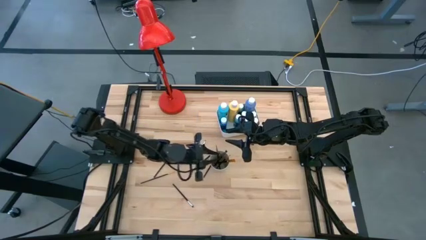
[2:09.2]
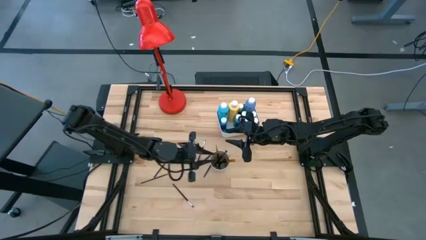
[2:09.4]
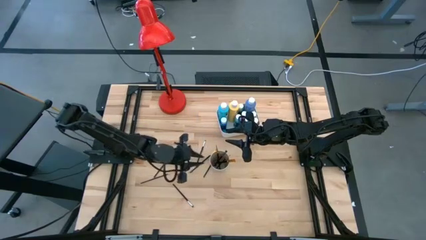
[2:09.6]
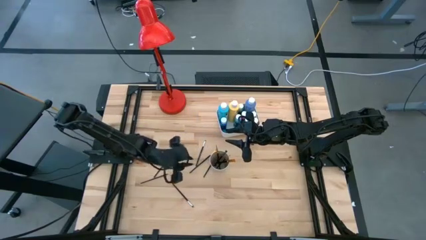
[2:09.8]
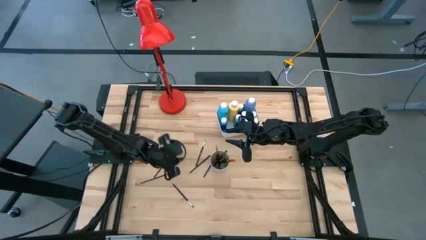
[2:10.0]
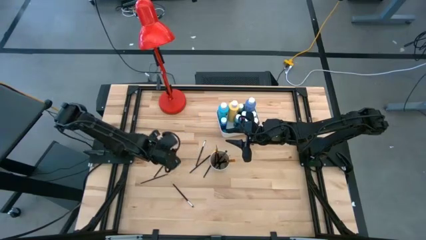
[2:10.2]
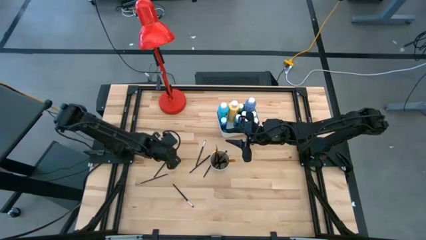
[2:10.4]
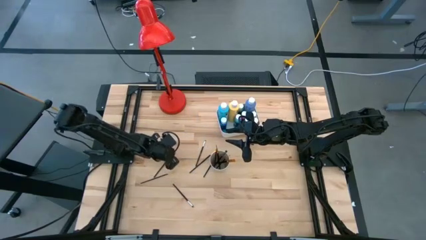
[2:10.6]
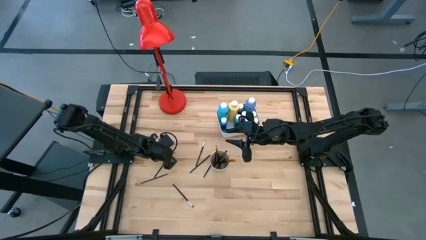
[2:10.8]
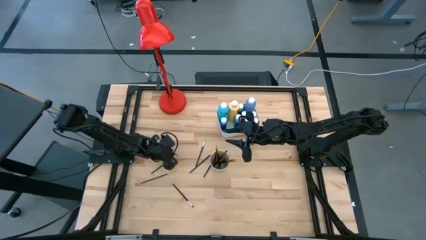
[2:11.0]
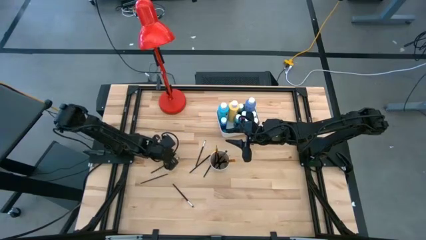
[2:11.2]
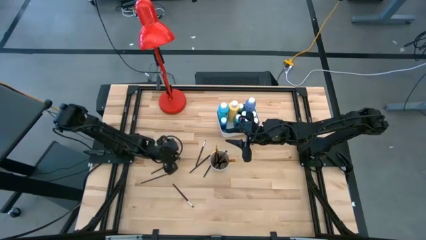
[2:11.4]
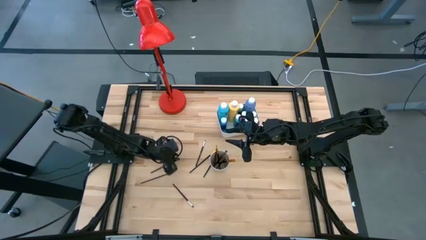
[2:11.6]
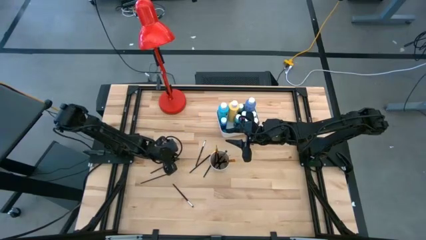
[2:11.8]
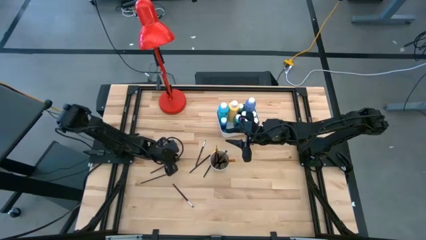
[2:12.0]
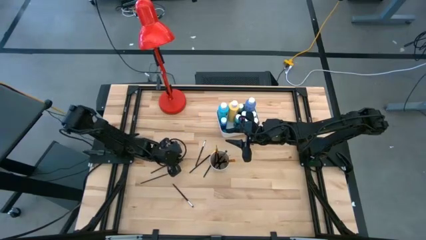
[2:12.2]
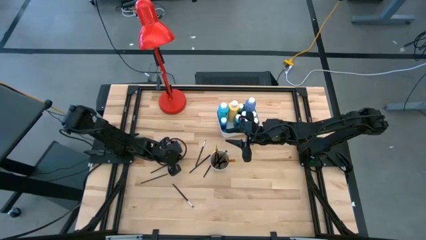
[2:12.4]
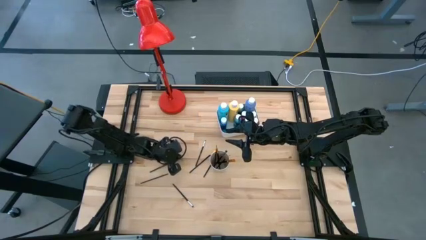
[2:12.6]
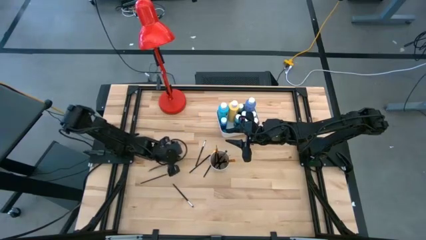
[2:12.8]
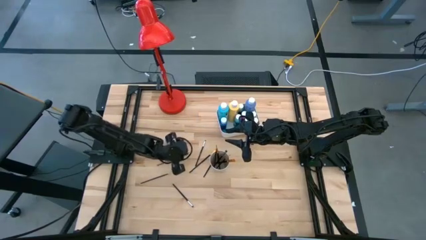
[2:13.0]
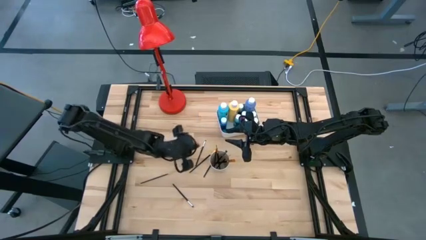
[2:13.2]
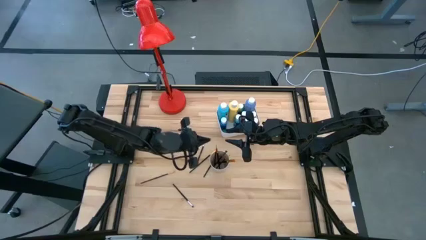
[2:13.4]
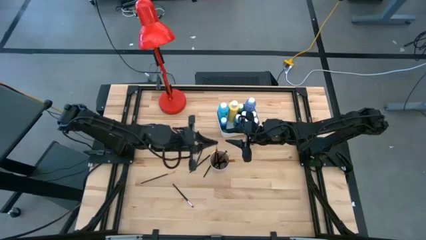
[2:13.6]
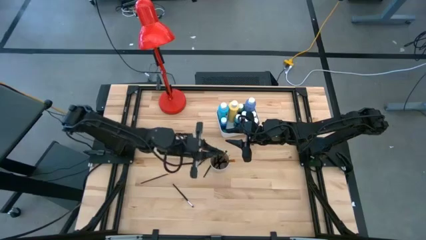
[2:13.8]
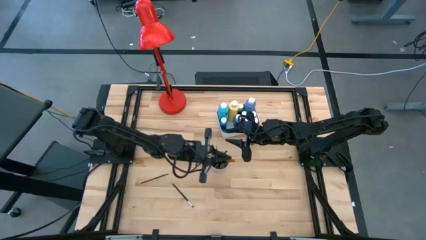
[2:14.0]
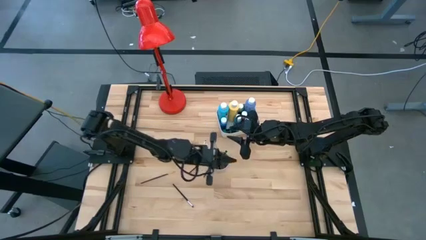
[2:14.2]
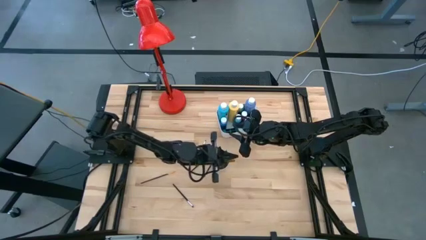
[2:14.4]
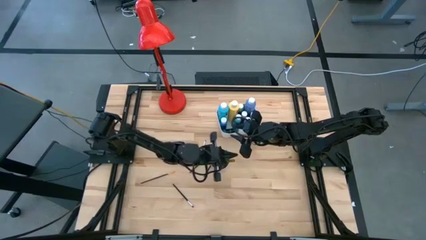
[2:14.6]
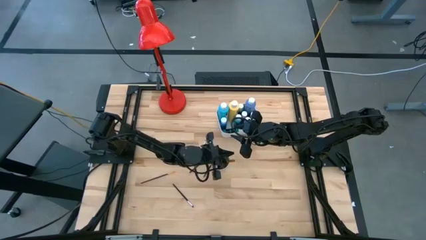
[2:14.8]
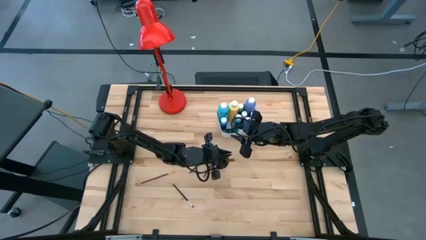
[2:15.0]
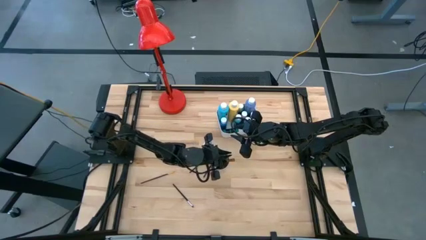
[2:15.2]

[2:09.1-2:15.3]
Task: Pick & Place Paint Supplies
Put the silver paint brush into the white cup

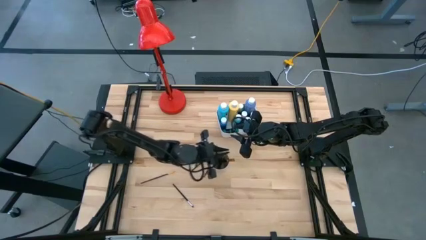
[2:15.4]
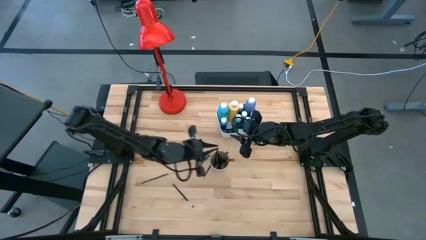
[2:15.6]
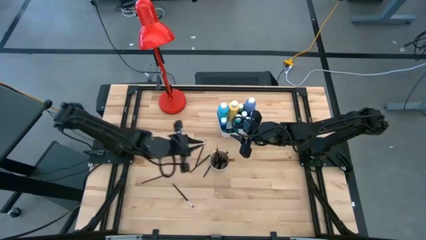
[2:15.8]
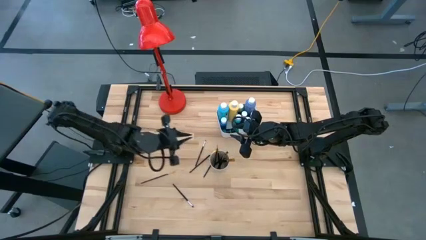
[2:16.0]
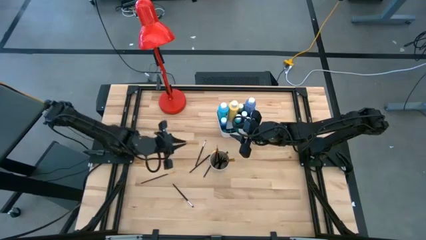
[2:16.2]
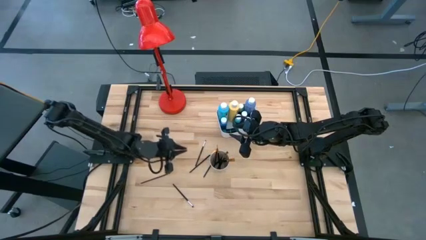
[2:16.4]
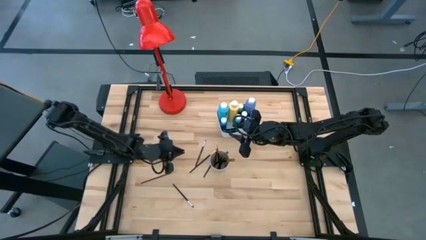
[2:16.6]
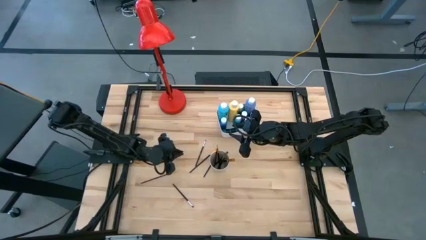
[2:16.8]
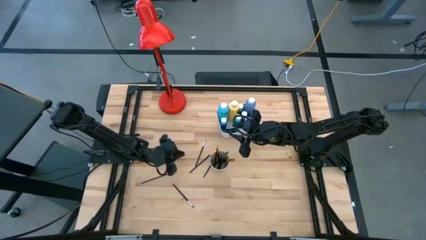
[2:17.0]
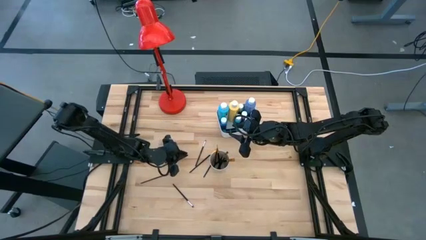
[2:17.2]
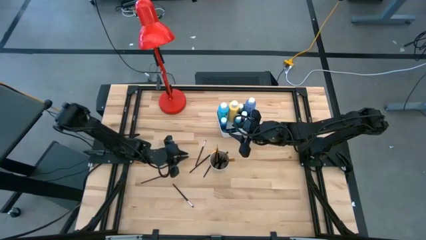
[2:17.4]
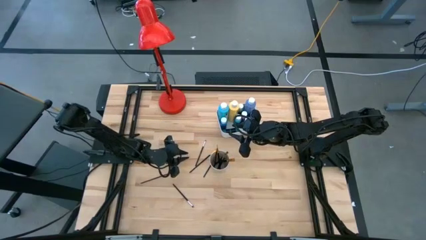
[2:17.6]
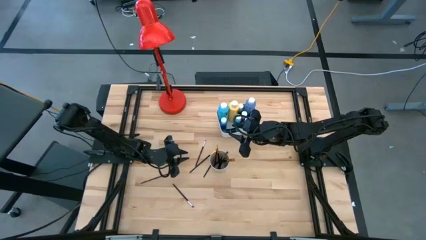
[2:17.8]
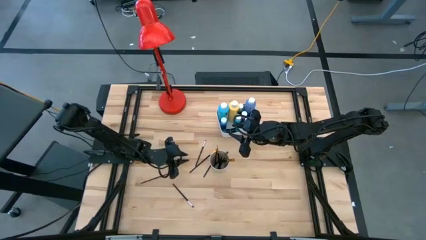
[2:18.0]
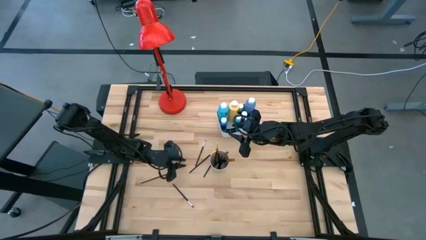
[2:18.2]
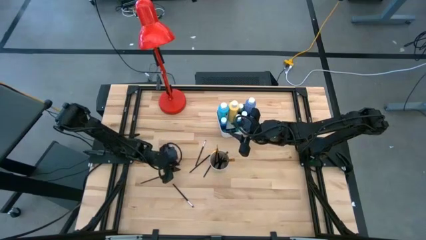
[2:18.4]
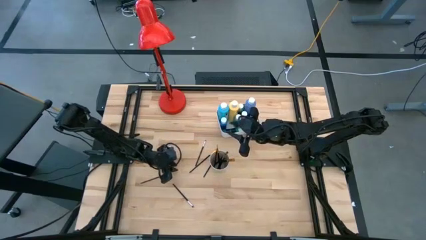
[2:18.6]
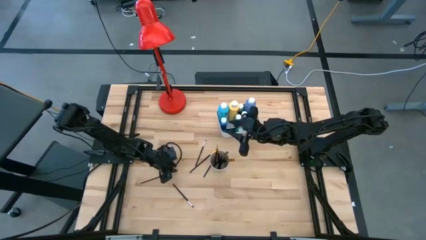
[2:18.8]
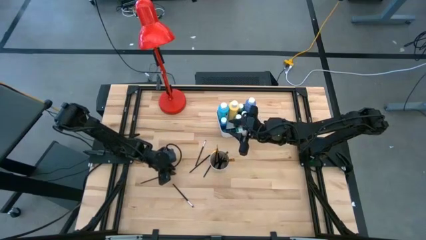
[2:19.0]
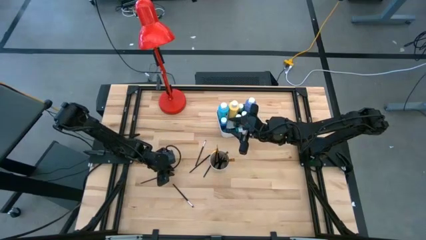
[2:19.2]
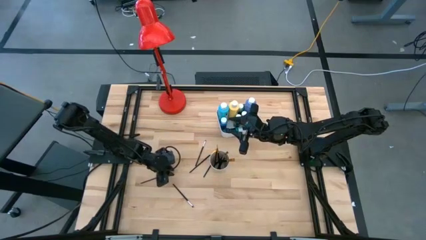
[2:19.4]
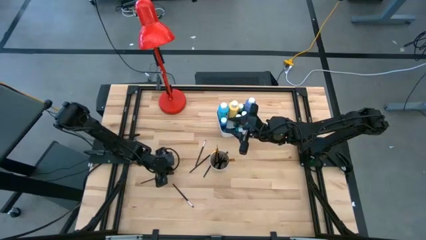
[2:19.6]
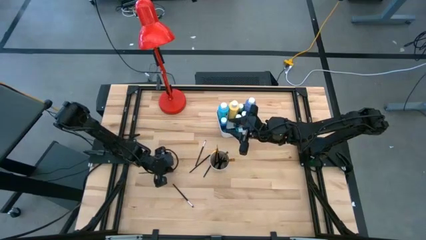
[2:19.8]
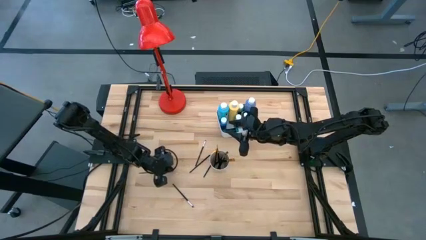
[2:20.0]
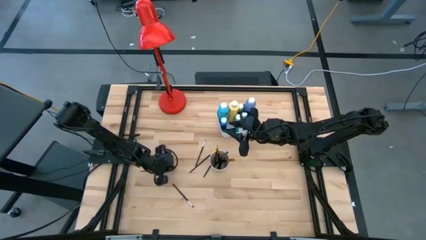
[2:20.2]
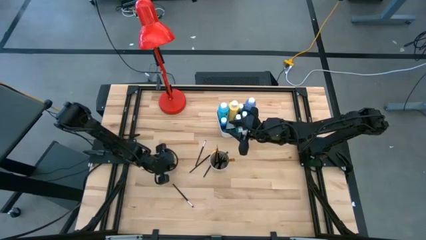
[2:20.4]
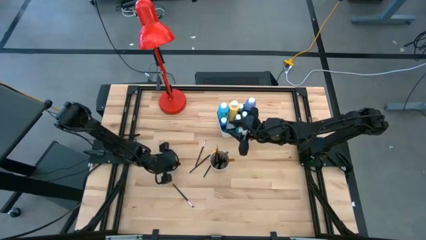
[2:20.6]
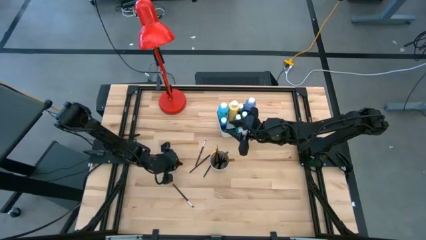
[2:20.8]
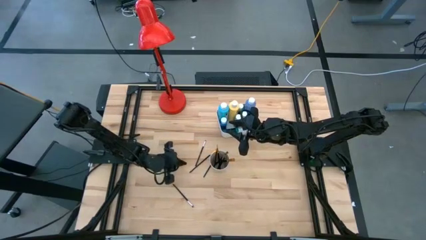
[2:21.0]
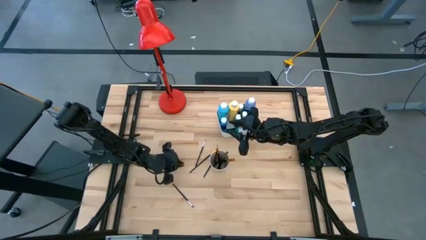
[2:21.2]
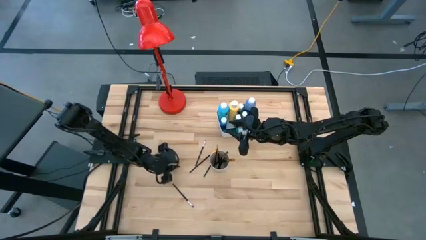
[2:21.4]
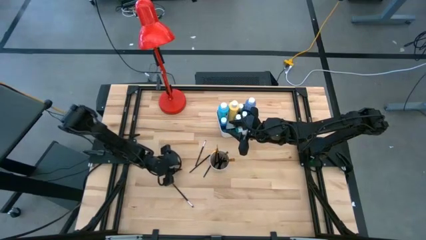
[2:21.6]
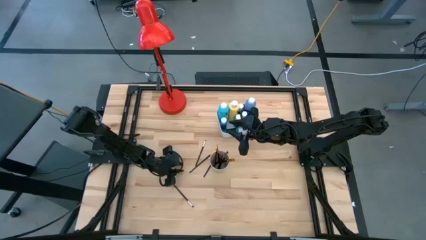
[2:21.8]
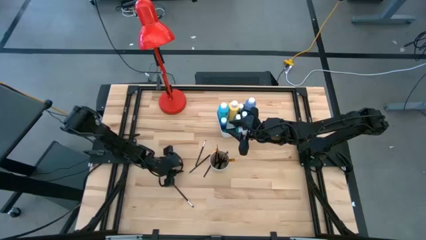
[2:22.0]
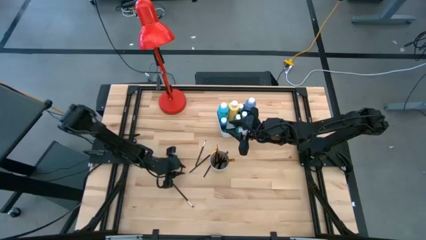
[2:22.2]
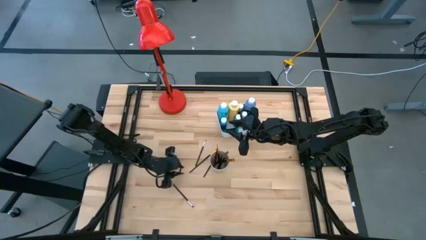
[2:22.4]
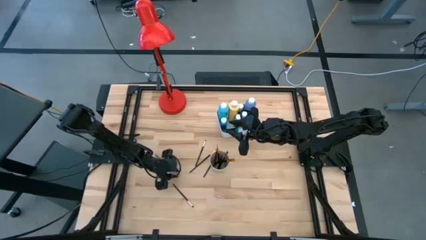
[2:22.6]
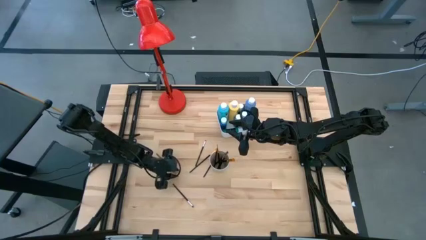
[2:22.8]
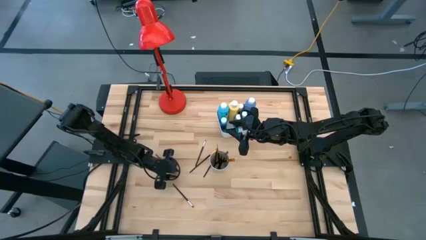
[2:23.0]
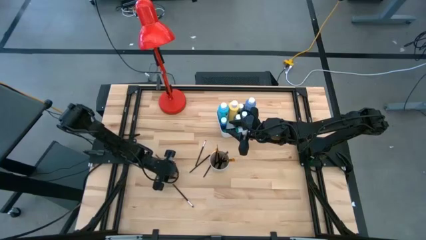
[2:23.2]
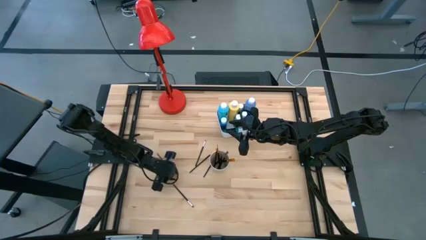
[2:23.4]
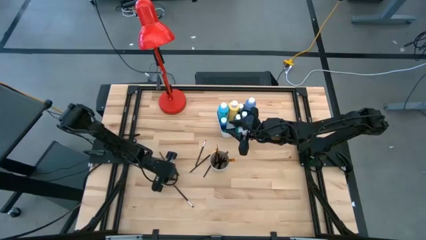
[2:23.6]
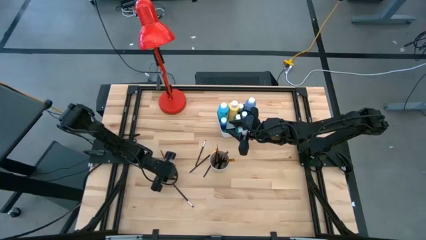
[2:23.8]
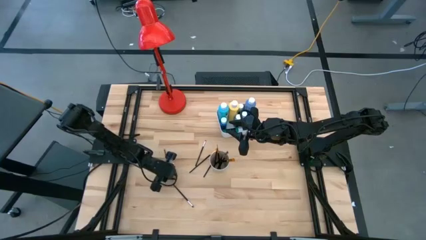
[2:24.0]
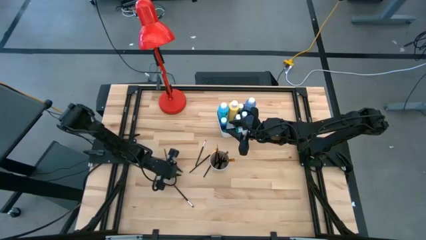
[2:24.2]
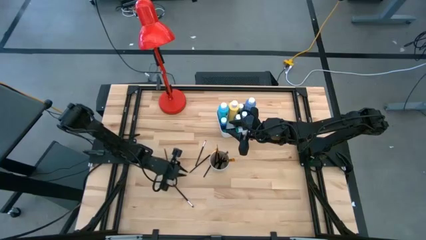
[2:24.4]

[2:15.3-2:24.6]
Put the gold paint brush into the white cup

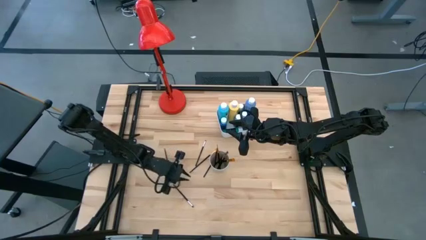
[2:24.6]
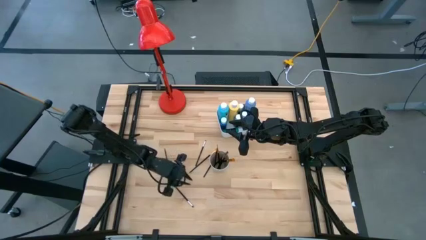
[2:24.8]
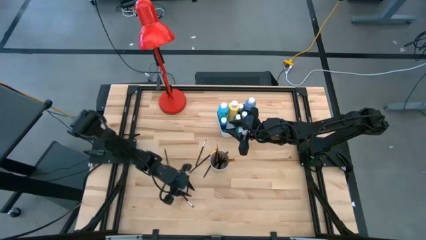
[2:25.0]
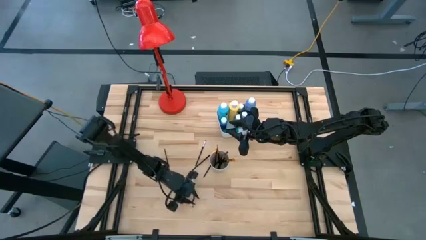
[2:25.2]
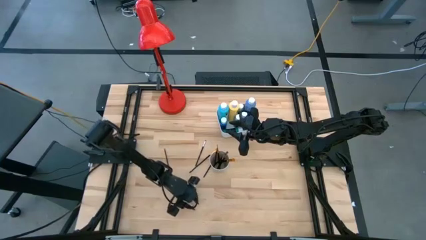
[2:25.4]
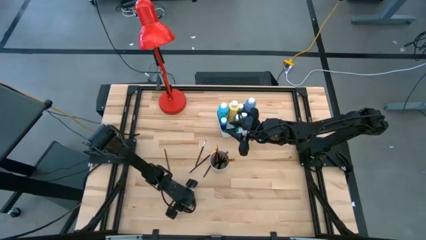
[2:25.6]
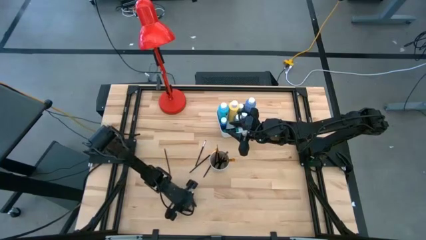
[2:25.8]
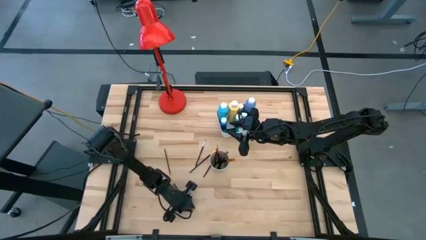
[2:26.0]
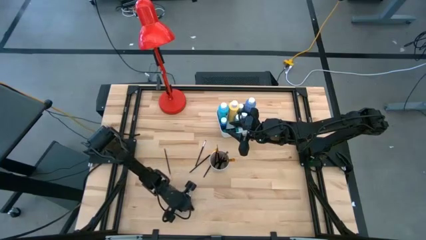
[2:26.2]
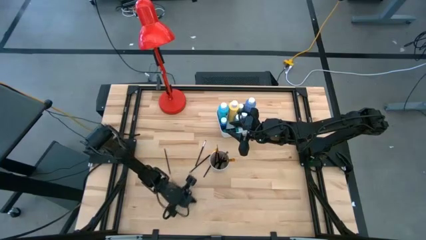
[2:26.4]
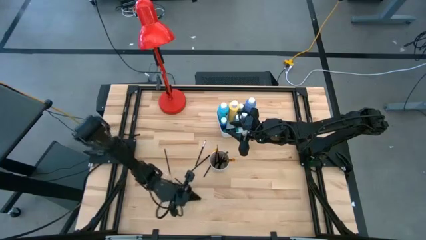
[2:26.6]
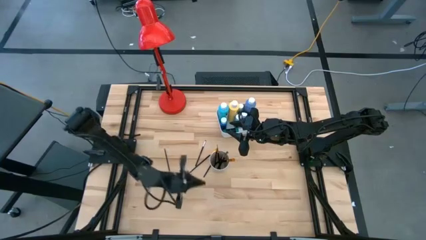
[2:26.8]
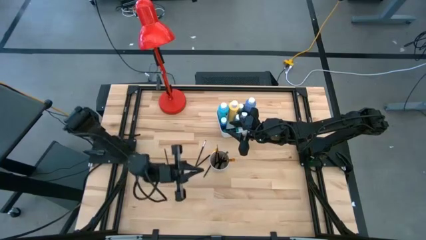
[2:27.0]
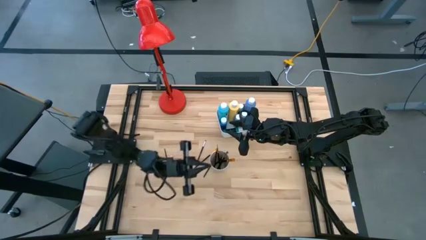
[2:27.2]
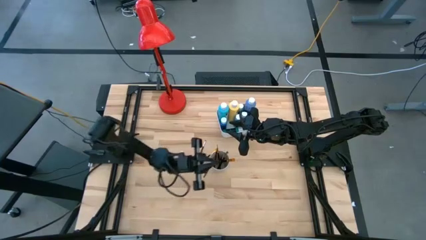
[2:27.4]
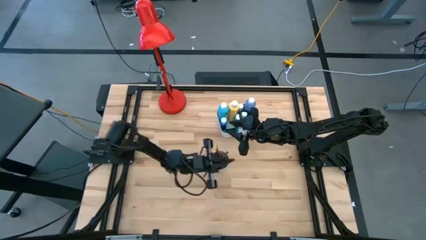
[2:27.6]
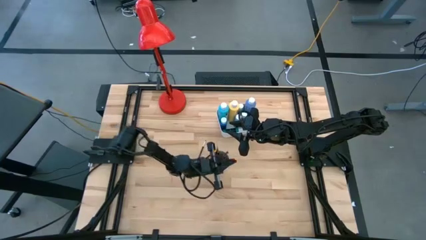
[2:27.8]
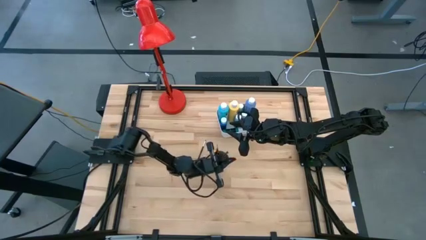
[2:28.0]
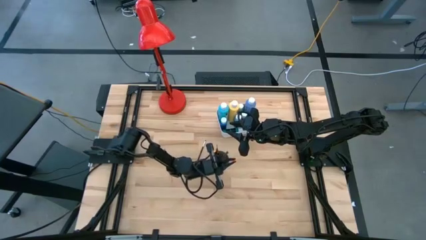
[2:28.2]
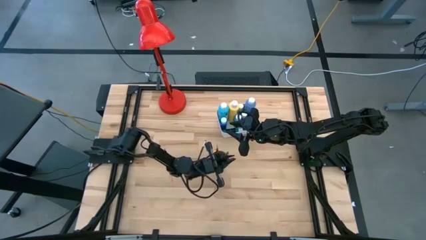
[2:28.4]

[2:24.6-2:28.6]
Put the silver paint brush into the white cup
